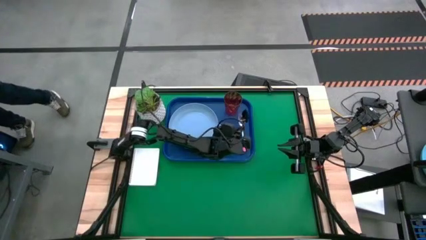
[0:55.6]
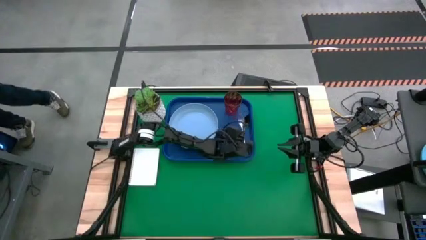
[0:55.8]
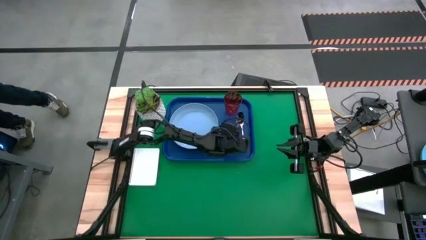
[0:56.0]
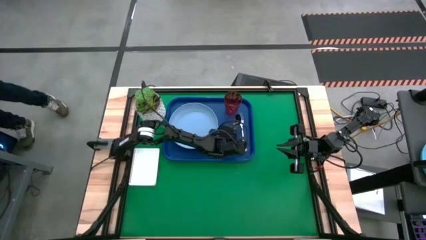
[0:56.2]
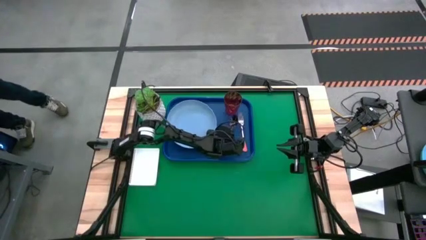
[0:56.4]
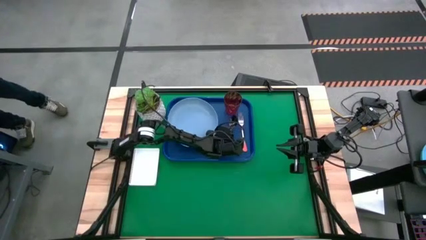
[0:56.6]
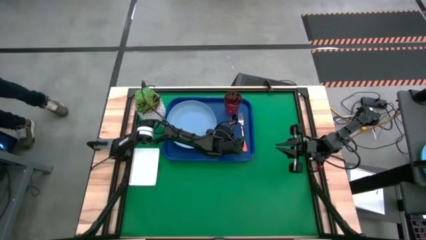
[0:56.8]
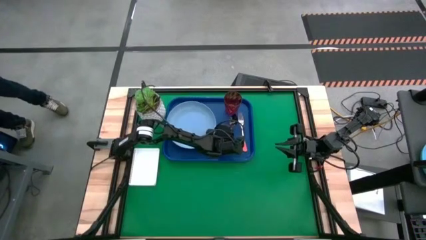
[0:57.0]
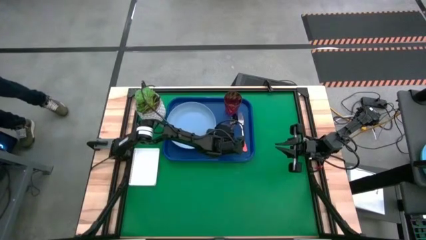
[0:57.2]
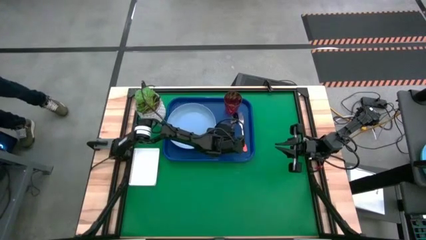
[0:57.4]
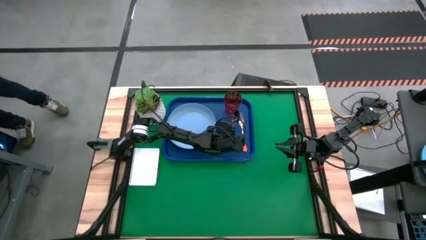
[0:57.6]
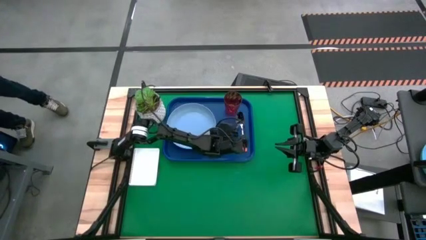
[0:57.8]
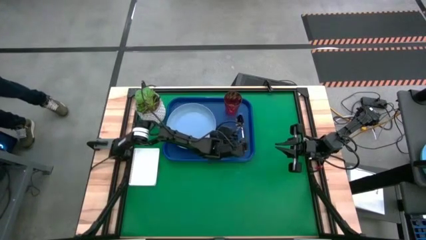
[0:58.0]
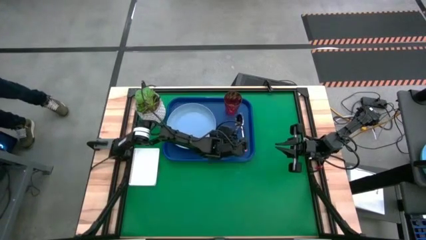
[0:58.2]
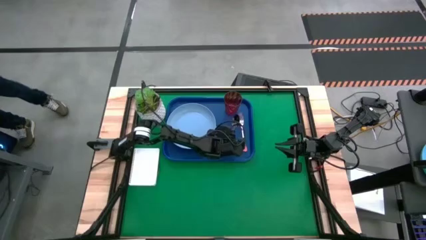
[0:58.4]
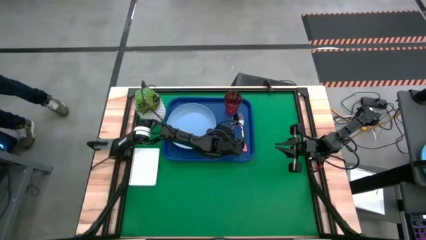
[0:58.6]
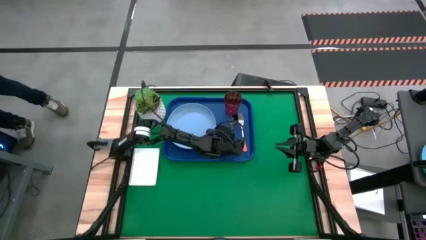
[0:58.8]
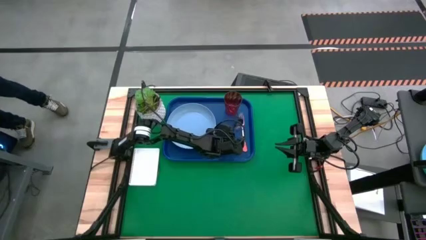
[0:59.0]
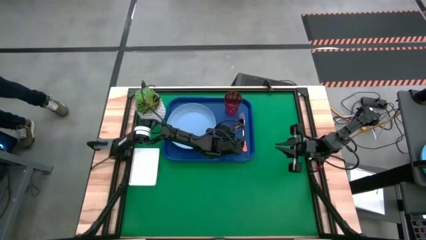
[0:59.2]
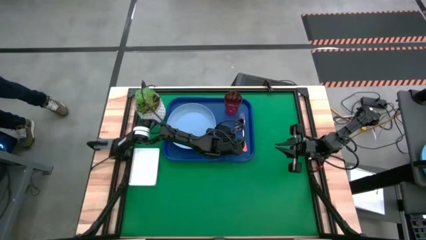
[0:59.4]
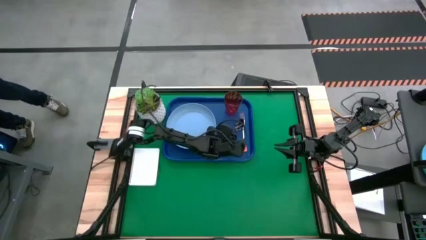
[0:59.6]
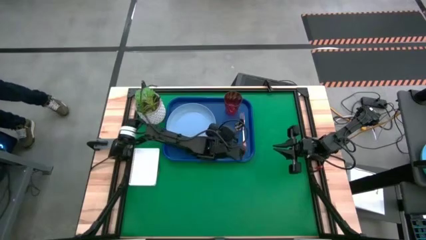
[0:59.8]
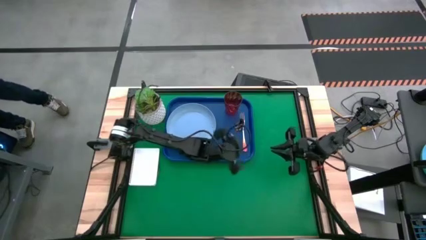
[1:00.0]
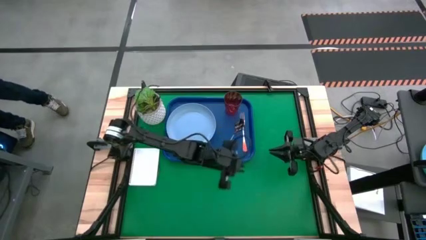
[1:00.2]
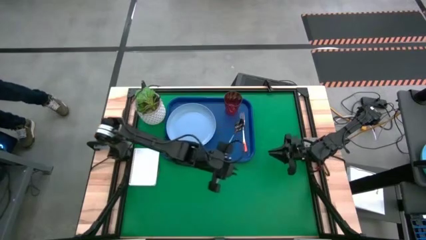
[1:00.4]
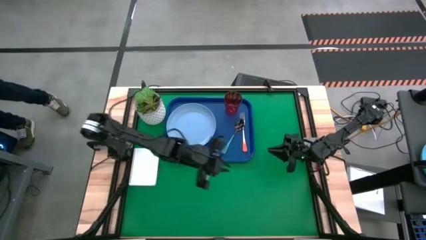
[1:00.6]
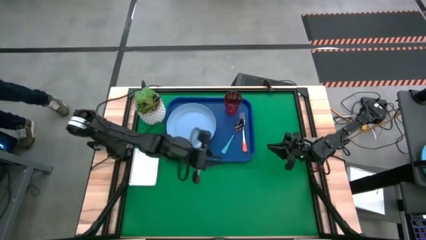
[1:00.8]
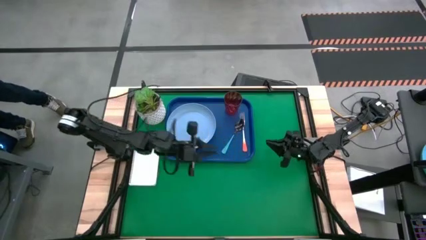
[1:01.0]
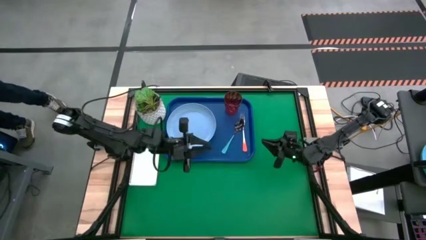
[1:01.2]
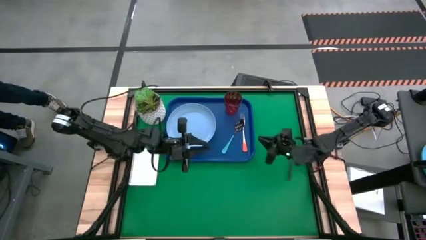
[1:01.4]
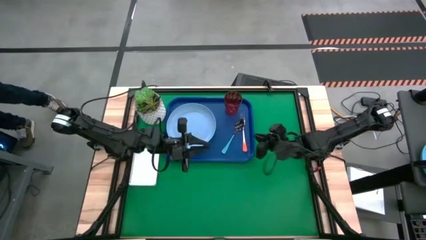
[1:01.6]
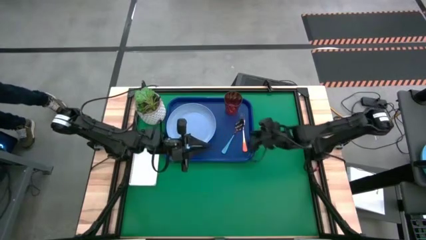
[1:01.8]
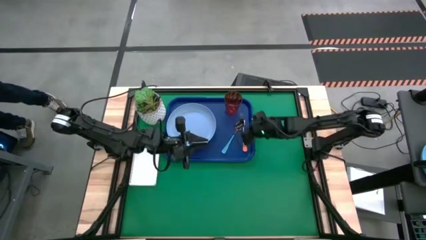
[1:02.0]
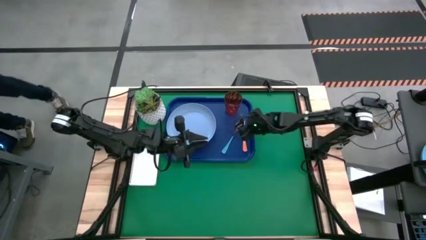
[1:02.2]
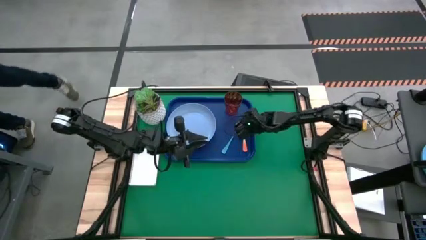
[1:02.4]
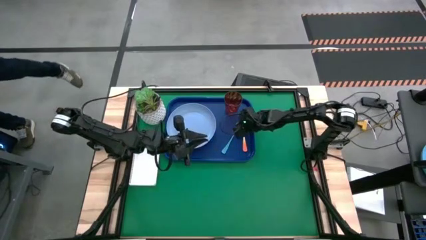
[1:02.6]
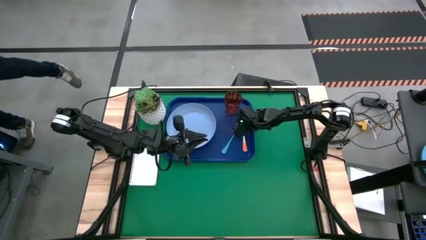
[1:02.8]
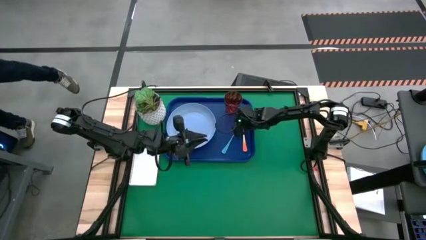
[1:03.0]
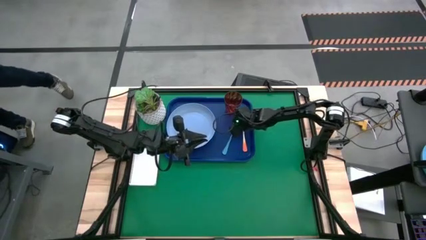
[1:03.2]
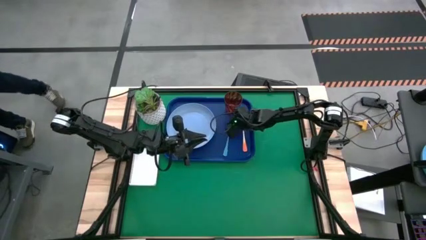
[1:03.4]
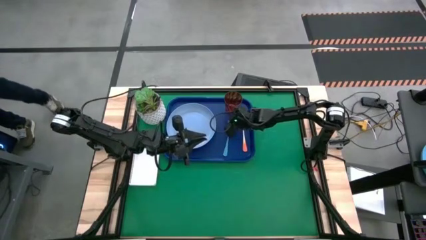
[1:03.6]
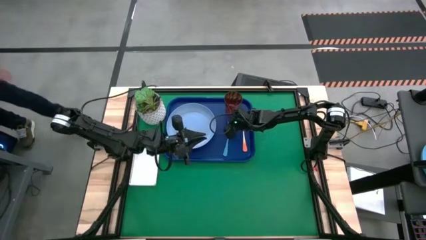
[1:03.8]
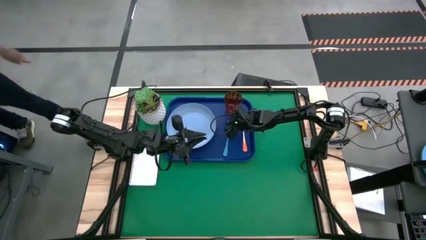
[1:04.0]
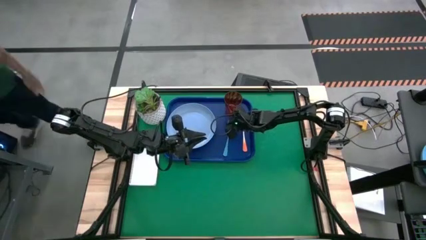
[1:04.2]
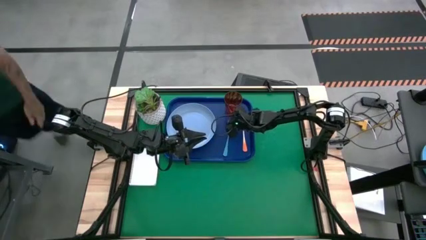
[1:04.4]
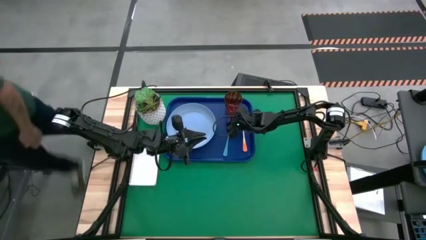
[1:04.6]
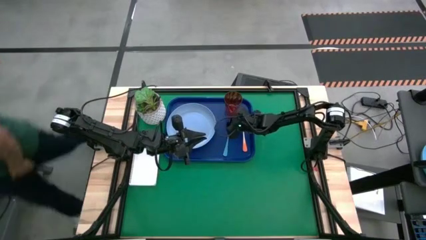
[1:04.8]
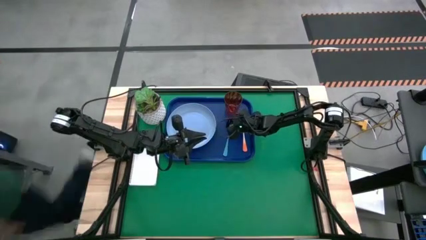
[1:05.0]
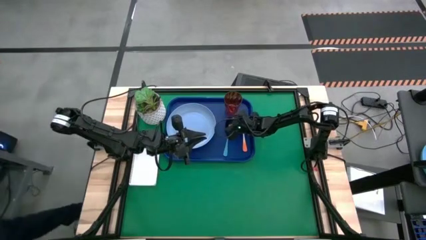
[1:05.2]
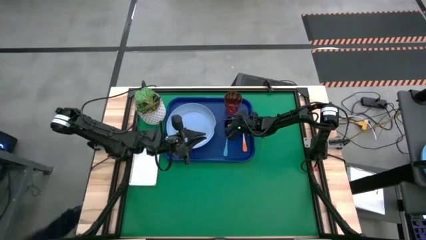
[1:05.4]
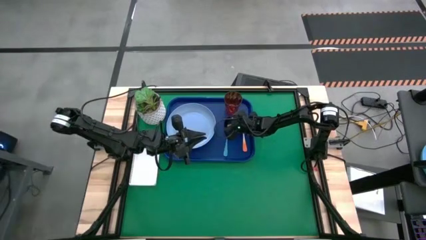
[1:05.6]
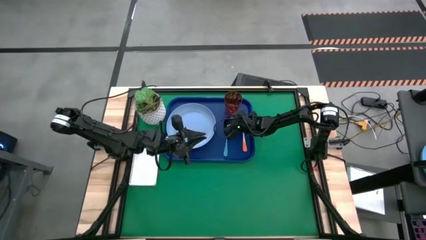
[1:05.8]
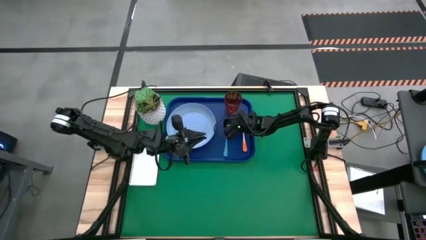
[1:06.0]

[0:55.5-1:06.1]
Task: Pick and place plate/cup/fork/spoon on tray
Put the blue spoon on the blue serving tray to the left side of the orange fork

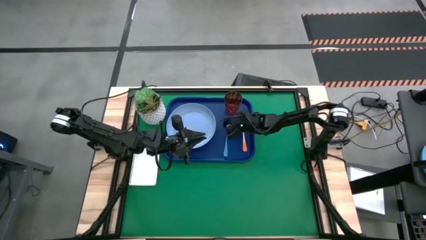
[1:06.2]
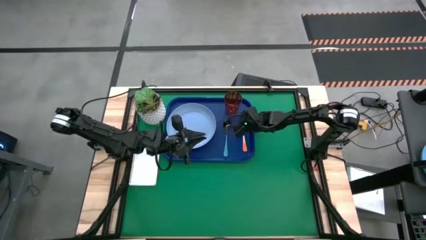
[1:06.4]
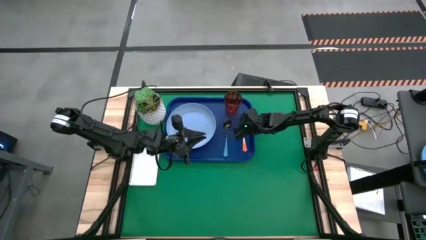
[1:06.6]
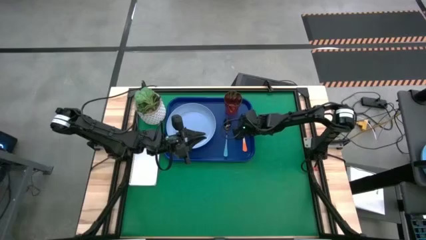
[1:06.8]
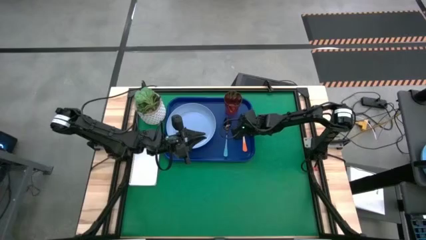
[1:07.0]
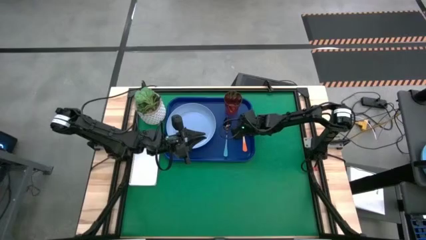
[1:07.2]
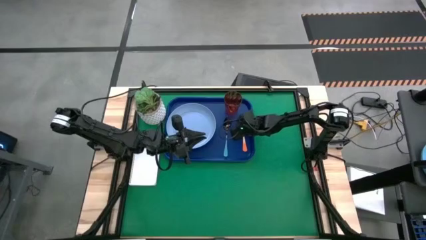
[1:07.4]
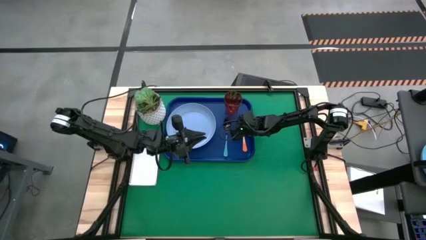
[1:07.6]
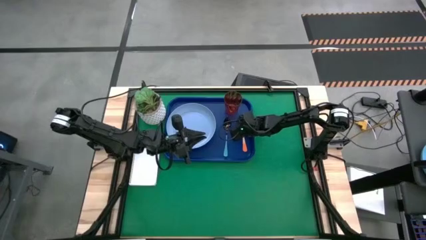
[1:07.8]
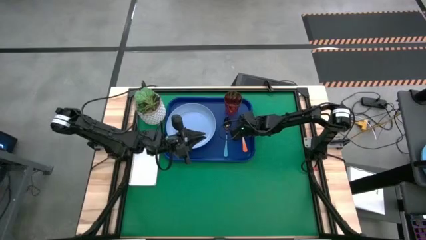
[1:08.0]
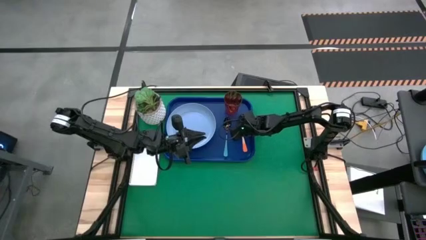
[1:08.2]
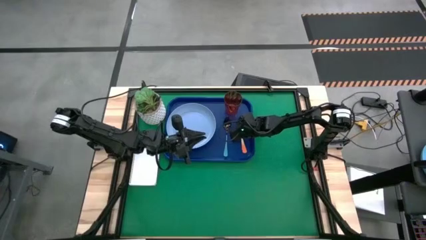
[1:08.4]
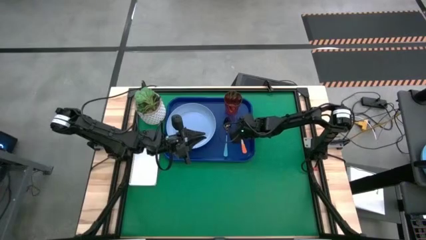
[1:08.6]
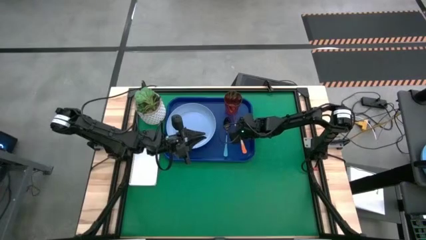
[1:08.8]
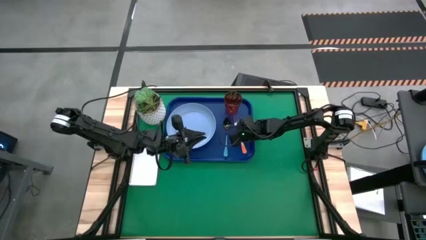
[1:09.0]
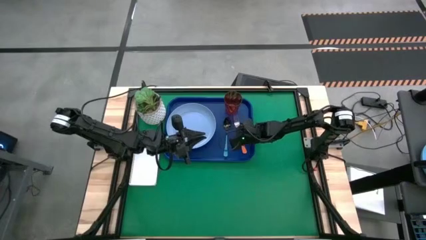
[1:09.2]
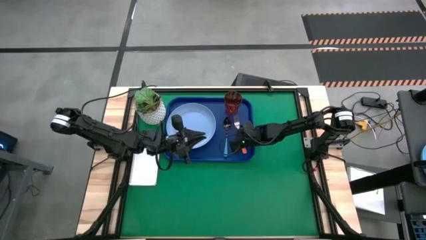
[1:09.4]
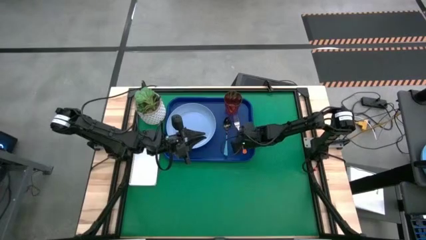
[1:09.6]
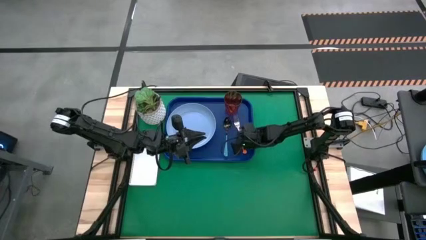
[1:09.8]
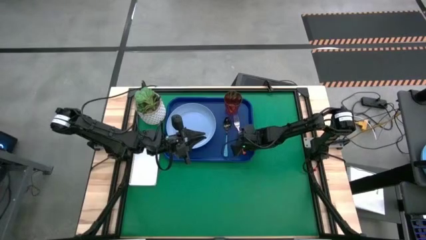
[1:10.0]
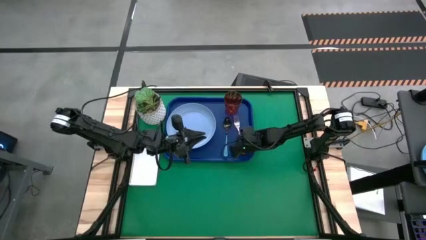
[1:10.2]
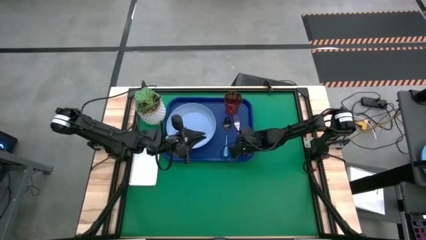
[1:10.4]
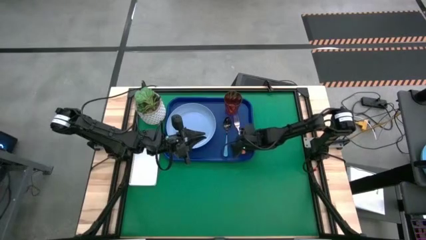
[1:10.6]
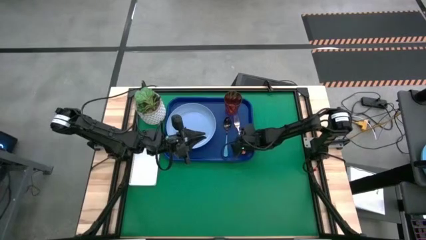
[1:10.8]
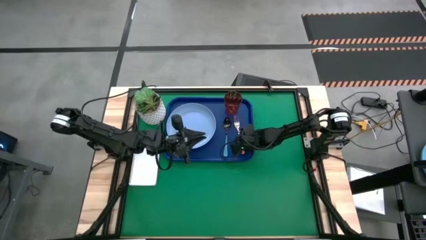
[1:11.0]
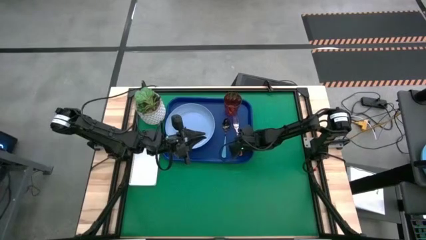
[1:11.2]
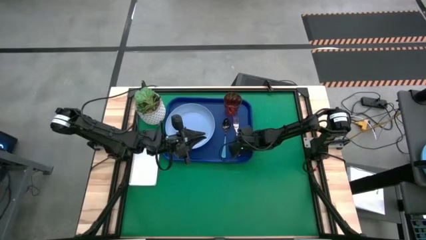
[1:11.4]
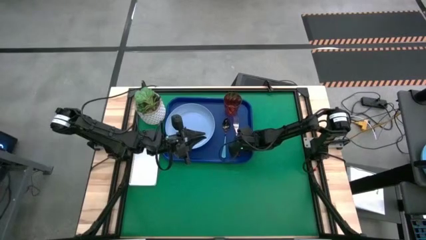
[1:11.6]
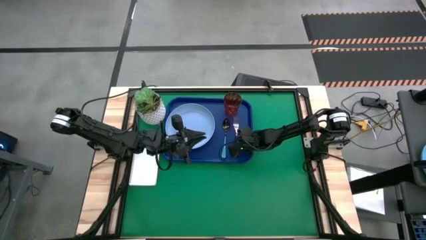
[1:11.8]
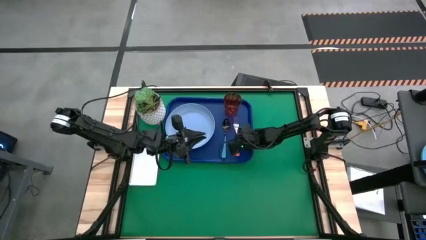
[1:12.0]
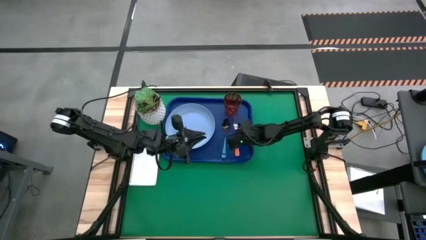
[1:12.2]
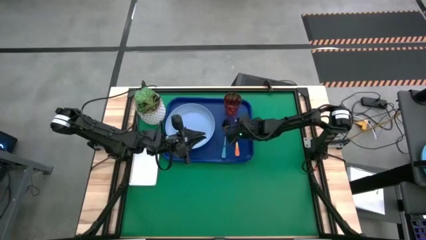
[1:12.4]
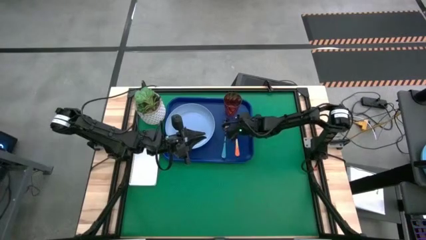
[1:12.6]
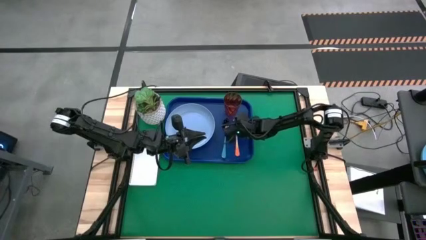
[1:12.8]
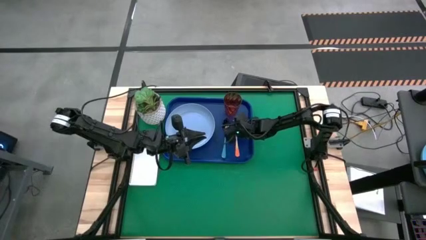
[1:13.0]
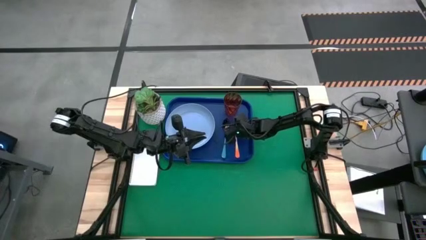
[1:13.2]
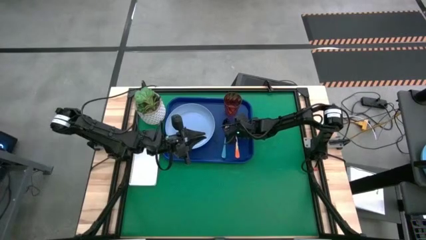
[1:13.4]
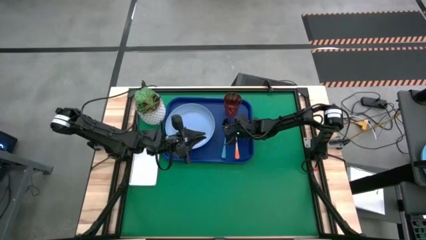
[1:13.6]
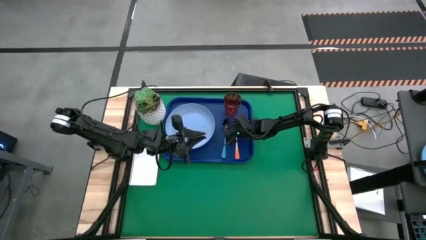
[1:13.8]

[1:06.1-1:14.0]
Adjust the orange fork to properly align them
